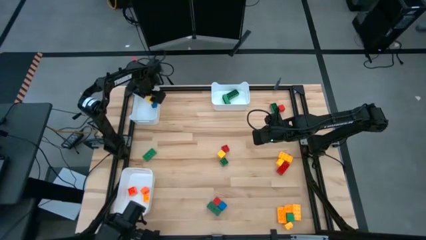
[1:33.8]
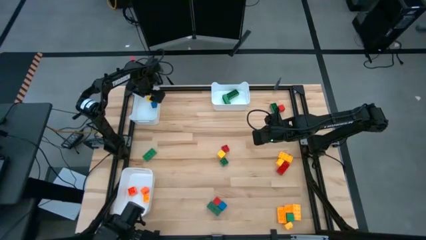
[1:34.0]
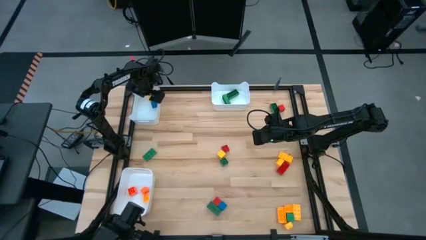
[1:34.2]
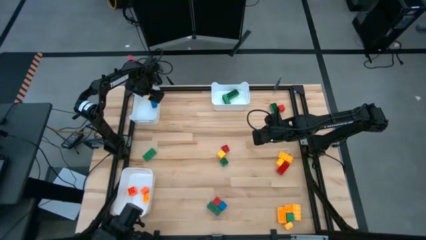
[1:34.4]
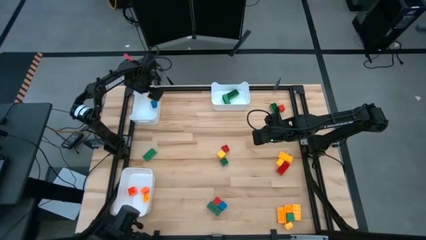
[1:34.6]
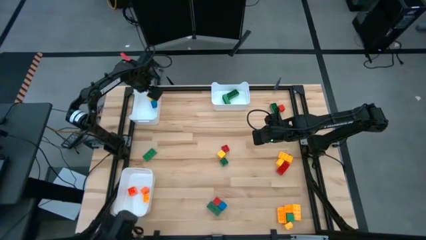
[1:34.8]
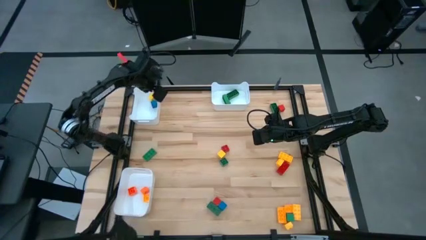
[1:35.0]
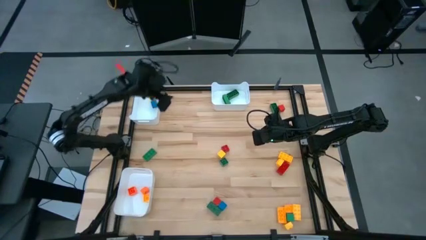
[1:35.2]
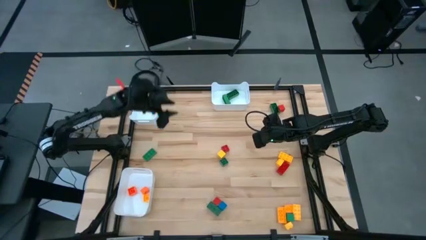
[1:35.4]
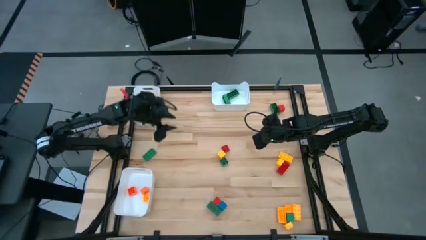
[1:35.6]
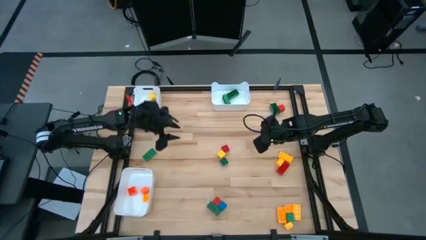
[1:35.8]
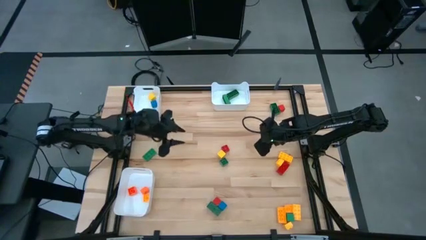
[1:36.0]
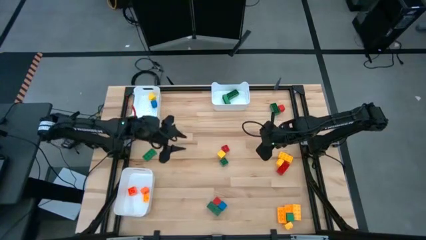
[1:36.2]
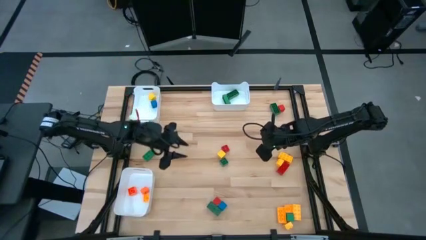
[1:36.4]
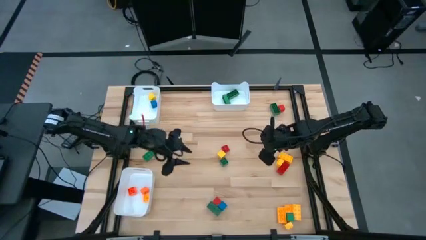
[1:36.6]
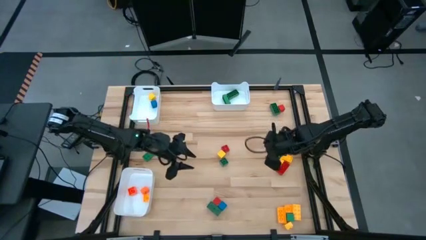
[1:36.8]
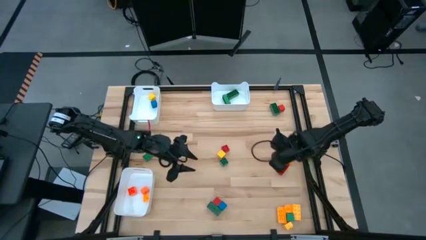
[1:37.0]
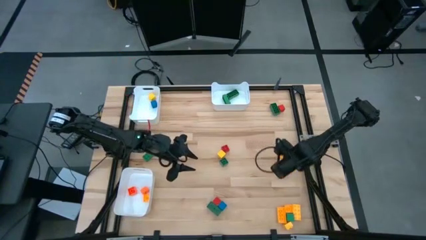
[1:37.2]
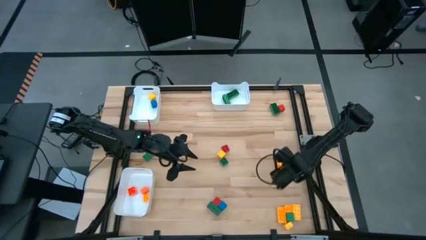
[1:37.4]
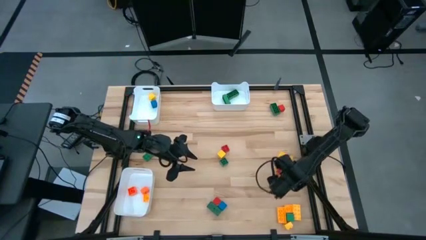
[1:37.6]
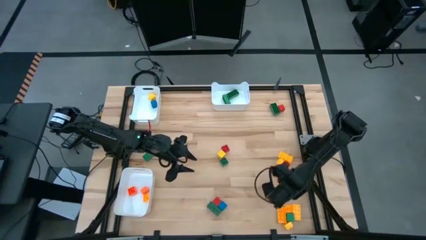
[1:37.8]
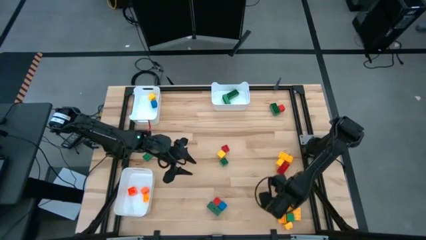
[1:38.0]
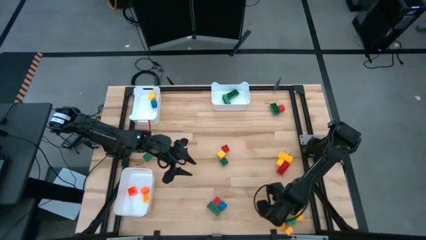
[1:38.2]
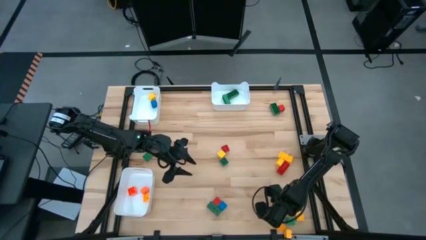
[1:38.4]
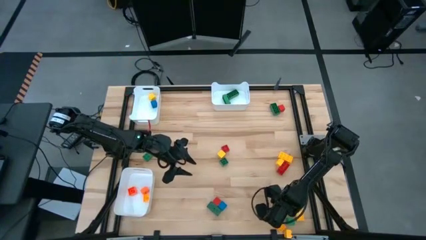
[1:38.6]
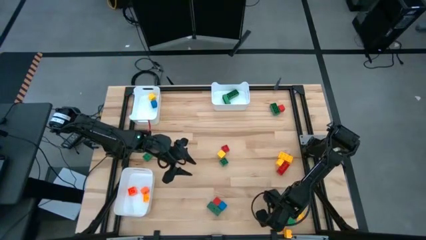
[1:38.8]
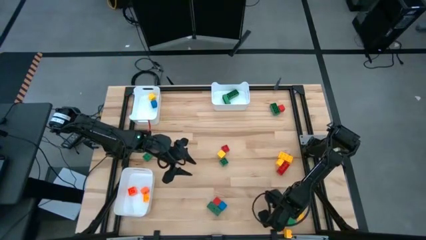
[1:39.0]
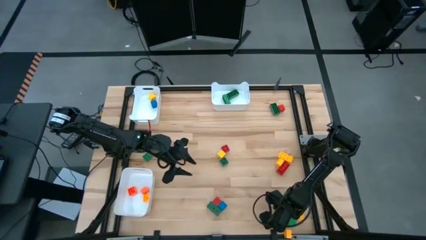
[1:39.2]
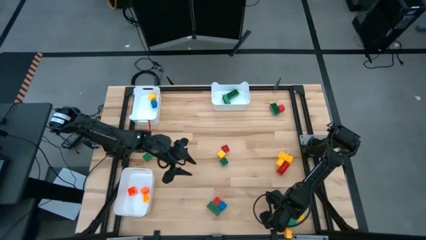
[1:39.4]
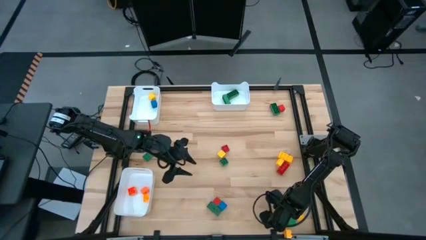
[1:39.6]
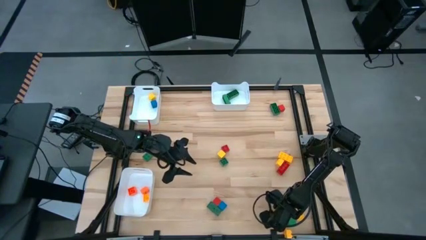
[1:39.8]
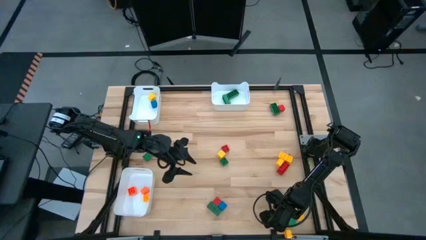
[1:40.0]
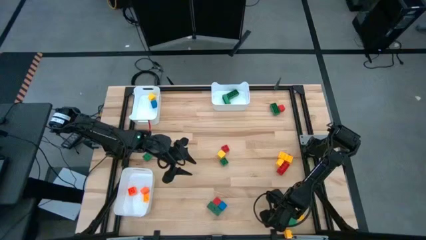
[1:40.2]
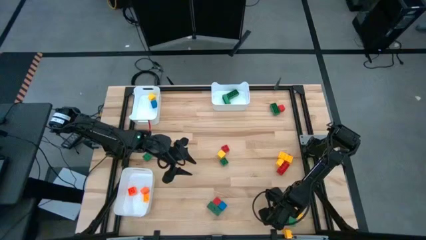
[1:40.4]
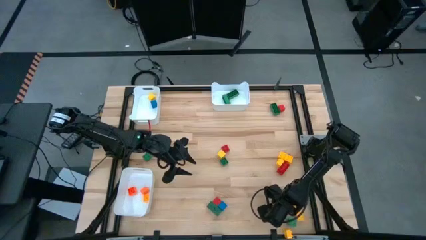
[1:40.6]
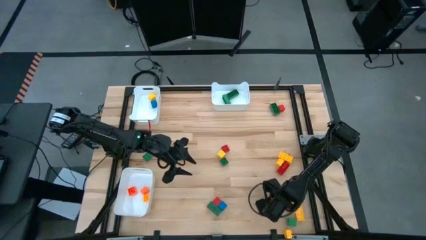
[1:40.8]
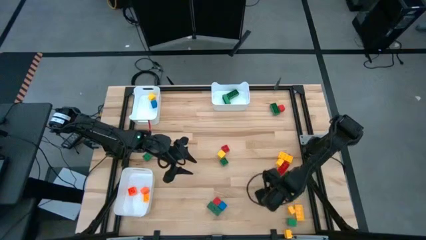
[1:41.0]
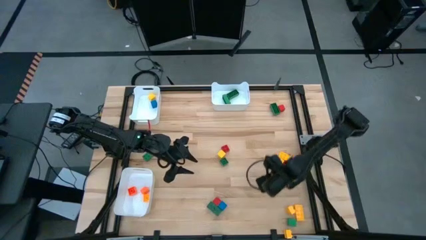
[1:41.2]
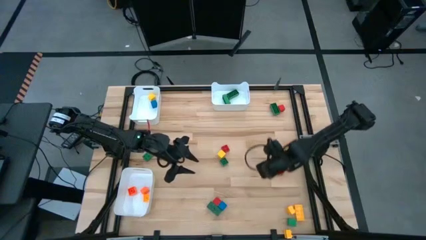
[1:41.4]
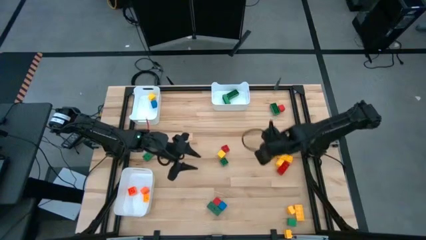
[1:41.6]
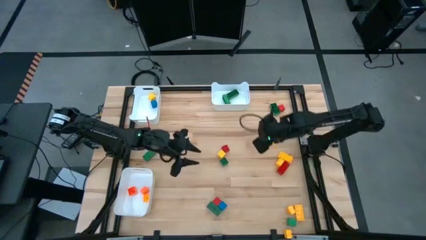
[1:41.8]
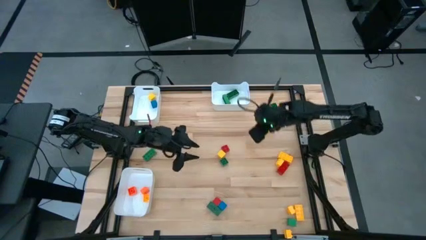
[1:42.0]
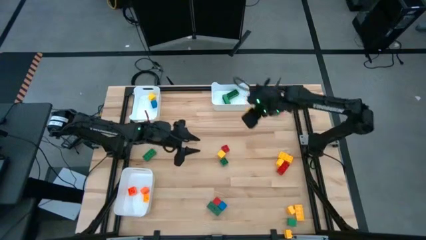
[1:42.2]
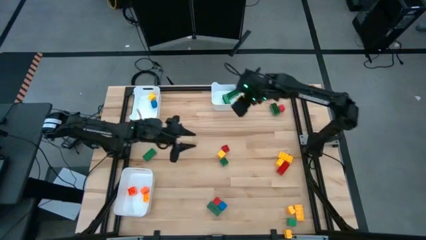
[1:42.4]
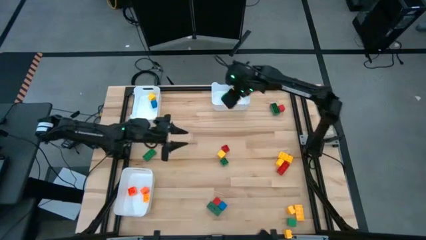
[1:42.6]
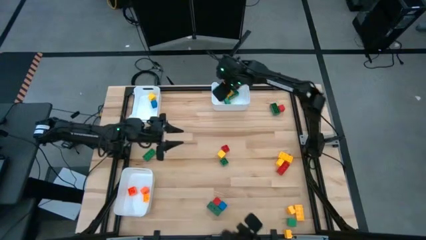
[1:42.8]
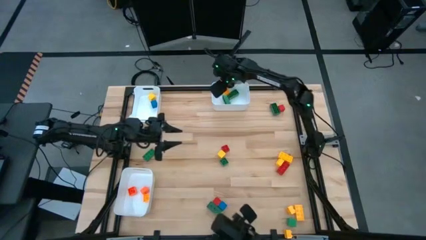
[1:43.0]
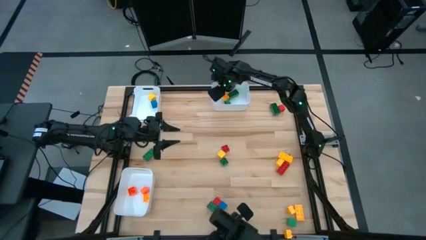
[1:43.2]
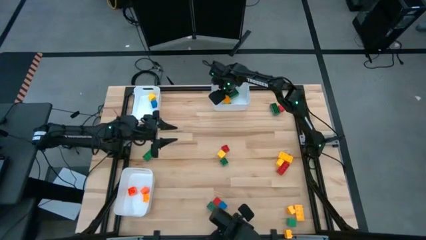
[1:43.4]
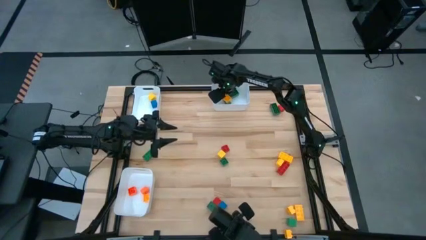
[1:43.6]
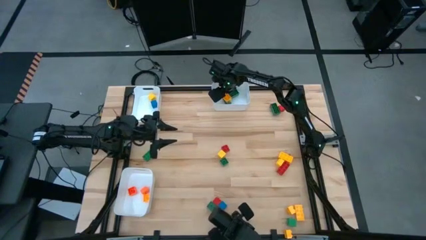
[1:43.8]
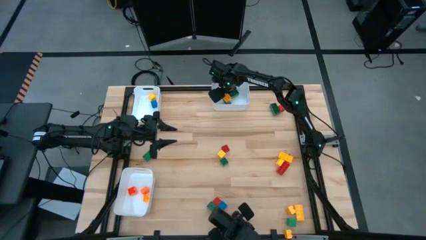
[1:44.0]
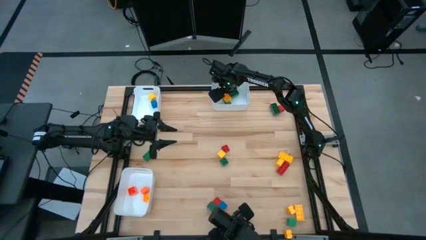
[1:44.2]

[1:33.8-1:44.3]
Task: Sort blocks by size
Put the yellow 8 stud game piece into the top right white bin

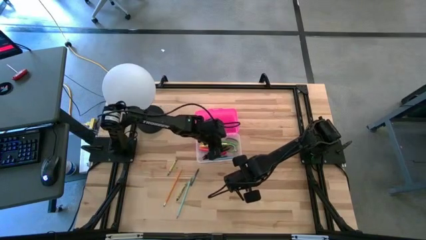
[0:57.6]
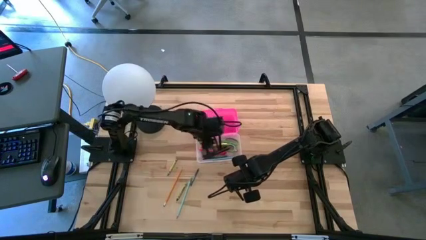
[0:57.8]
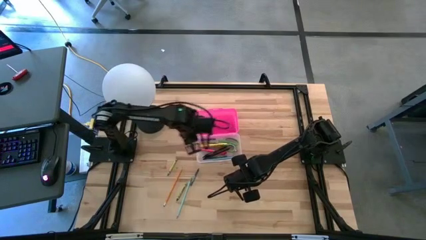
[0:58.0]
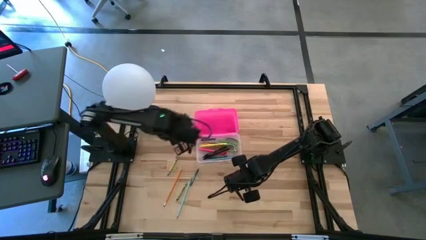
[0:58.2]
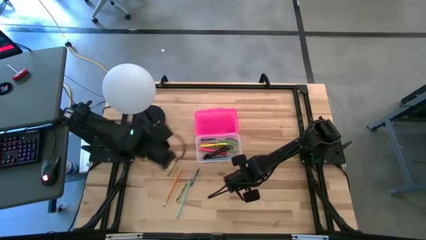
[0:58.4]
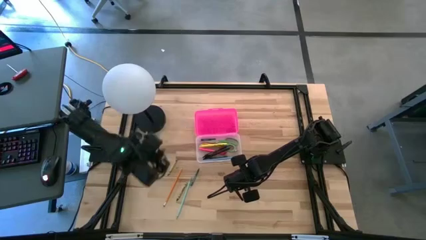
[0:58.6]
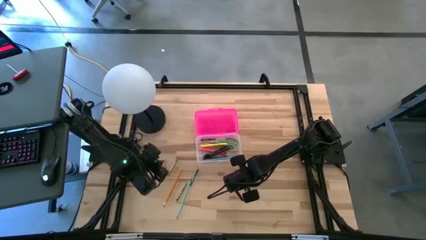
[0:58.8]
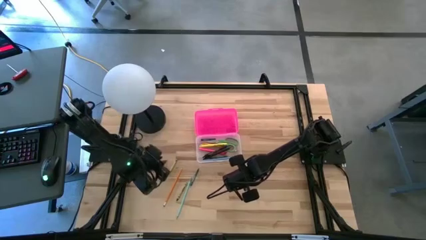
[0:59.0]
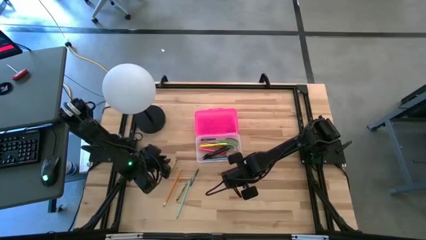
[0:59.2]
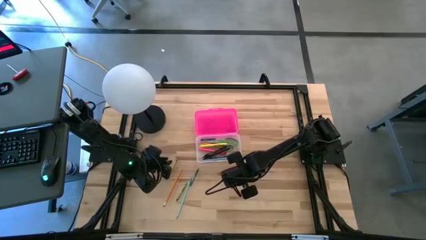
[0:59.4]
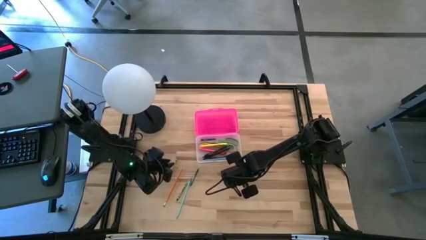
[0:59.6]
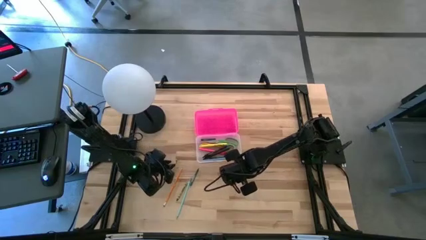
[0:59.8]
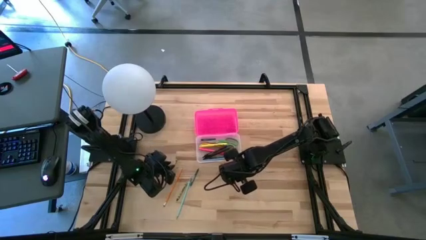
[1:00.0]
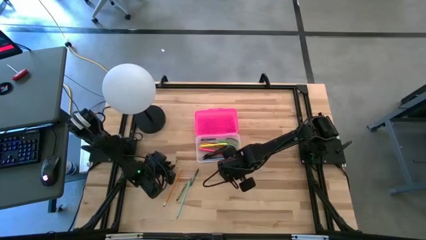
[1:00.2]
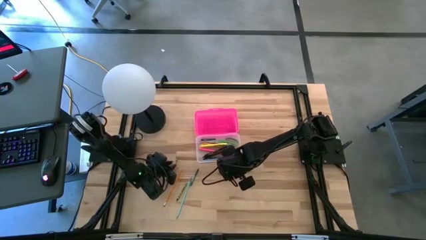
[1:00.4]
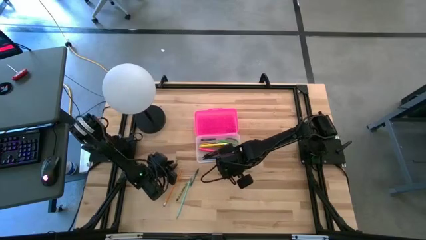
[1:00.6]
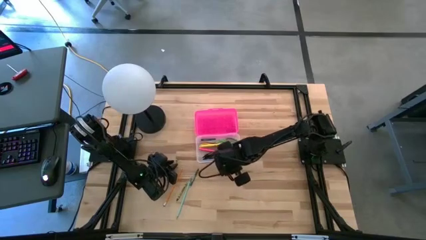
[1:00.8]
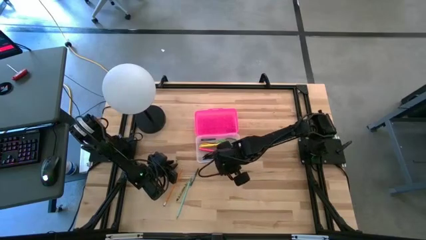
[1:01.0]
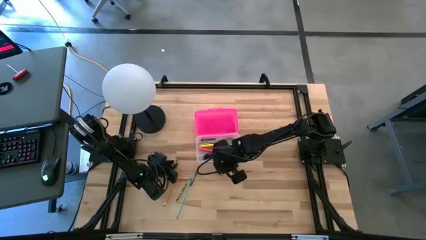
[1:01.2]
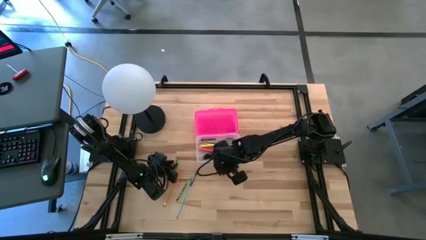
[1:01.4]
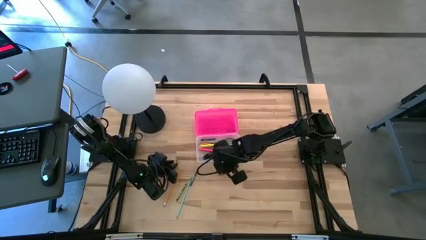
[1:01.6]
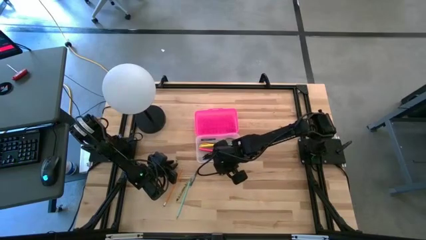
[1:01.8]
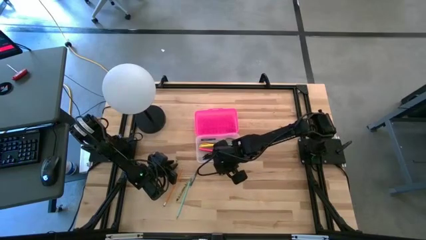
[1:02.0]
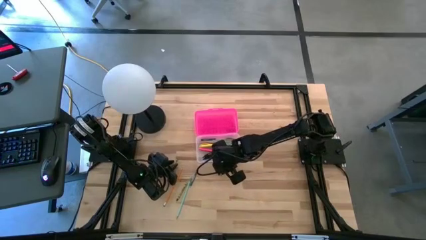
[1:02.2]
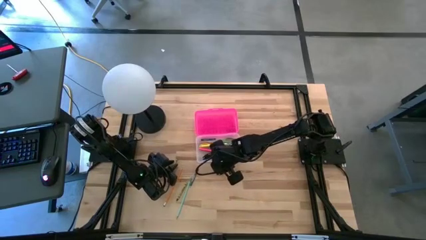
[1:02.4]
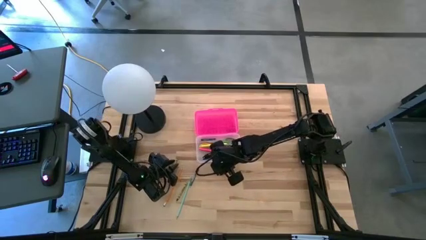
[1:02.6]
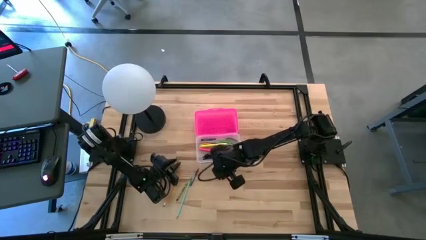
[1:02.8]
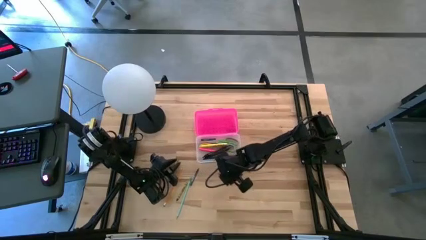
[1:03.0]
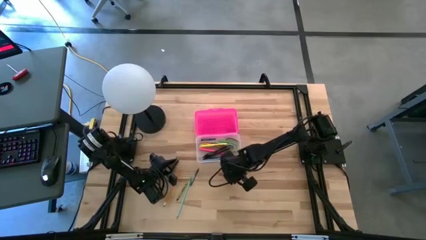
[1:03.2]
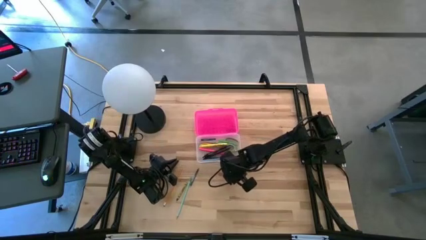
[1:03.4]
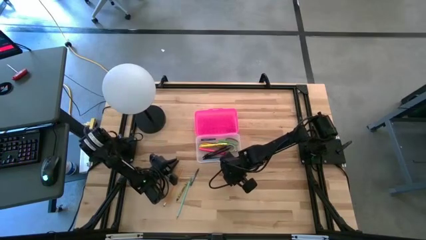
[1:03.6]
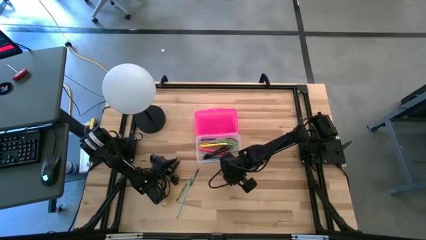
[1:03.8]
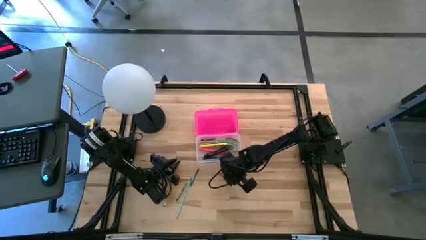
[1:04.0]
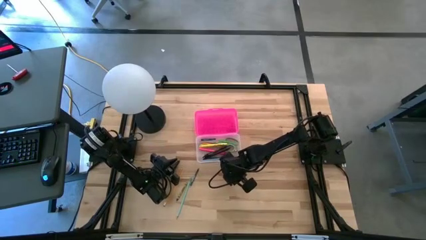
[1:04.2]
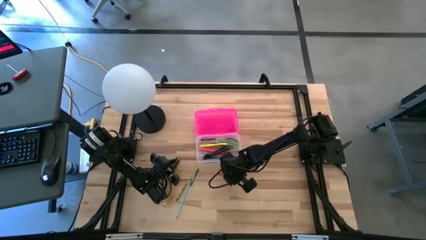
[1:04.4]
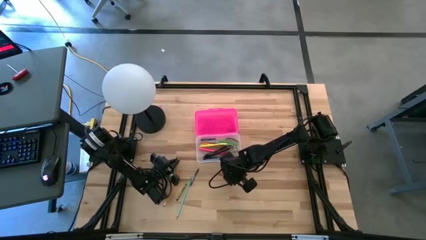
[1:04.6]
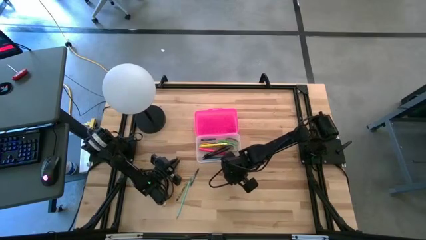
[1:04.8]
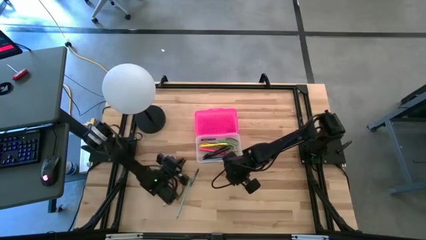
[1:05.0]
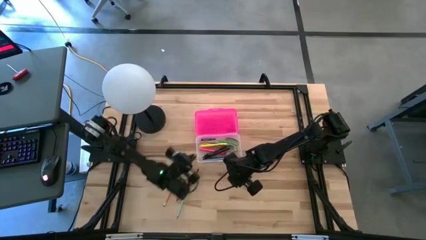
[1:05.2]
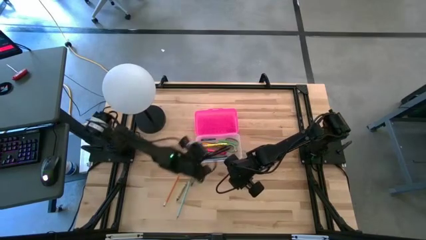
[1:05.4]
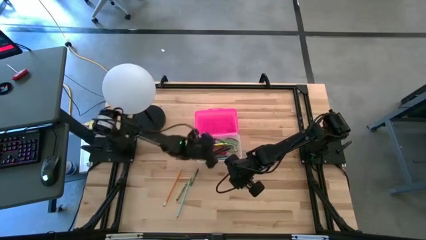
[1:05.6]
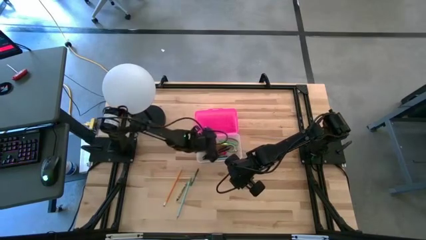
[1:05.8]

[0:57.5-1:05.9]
Task: Pick & place school supplies into a supply box
Put the top green crayon into the pink supply box
